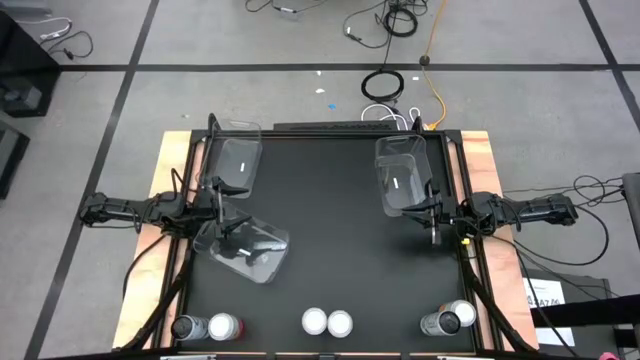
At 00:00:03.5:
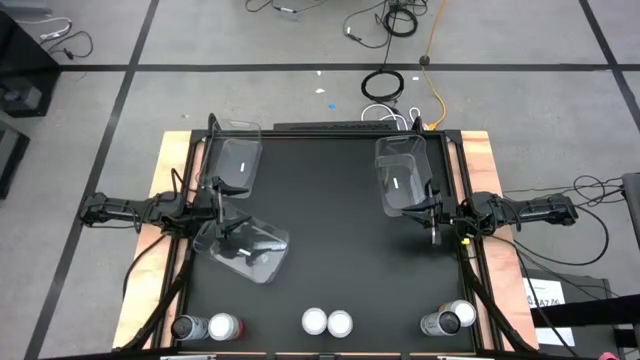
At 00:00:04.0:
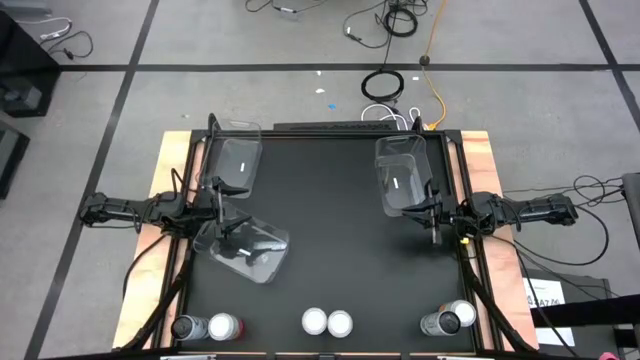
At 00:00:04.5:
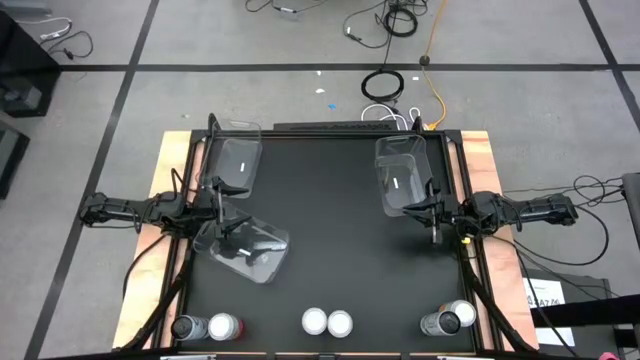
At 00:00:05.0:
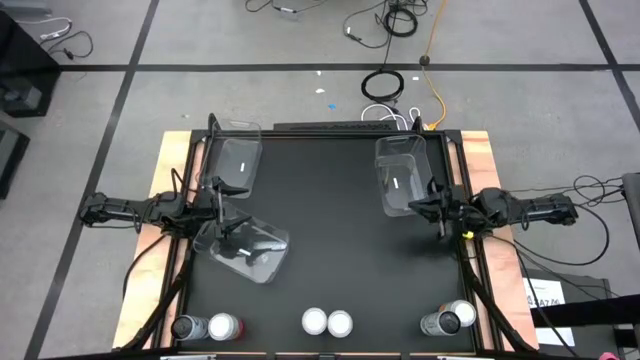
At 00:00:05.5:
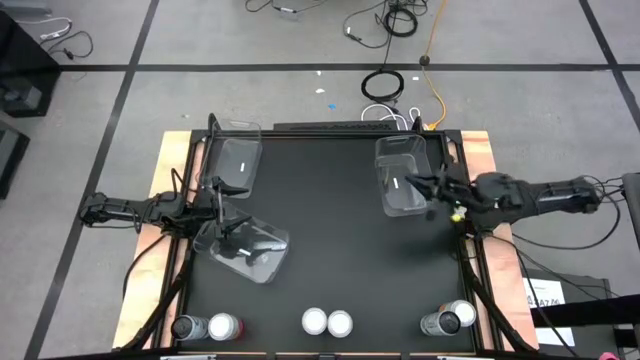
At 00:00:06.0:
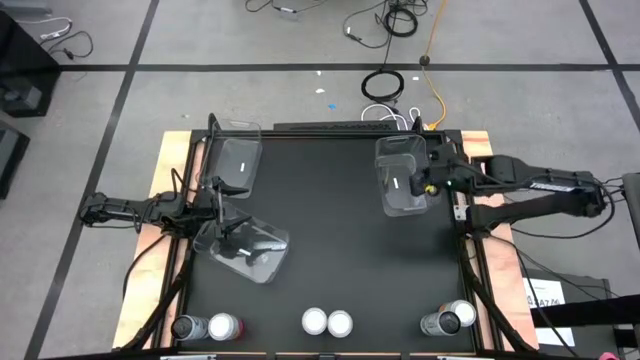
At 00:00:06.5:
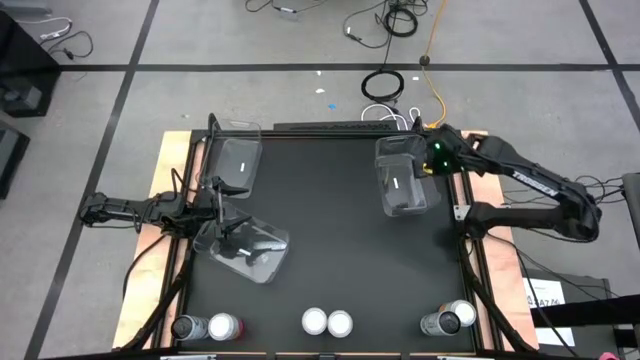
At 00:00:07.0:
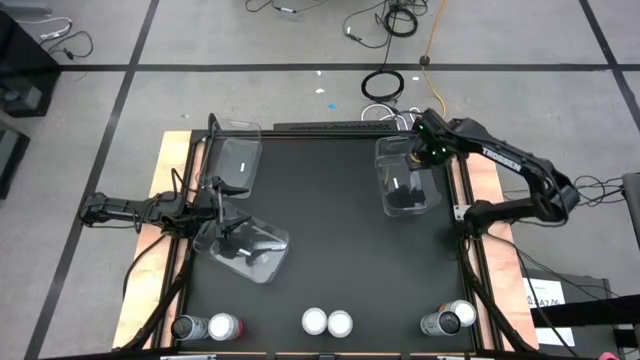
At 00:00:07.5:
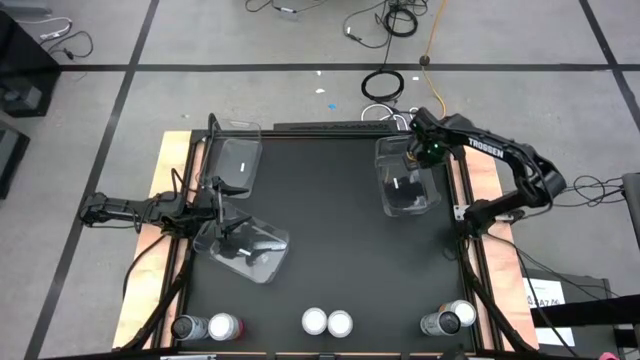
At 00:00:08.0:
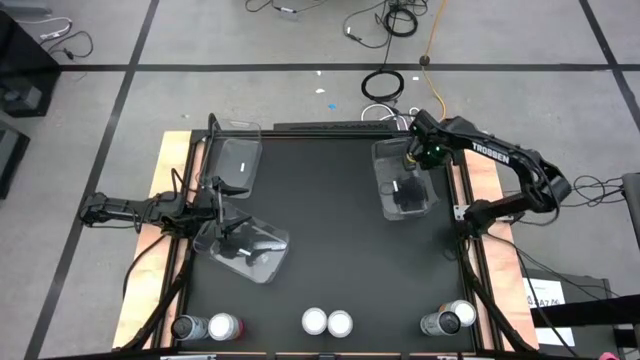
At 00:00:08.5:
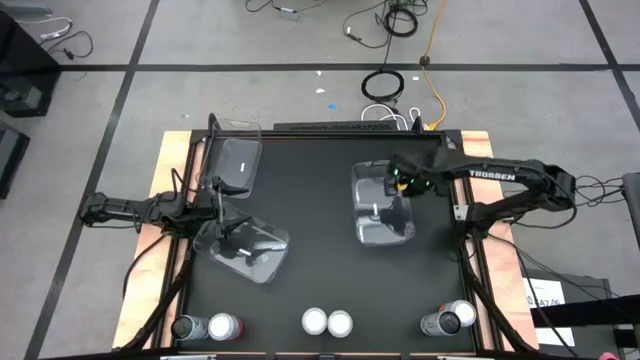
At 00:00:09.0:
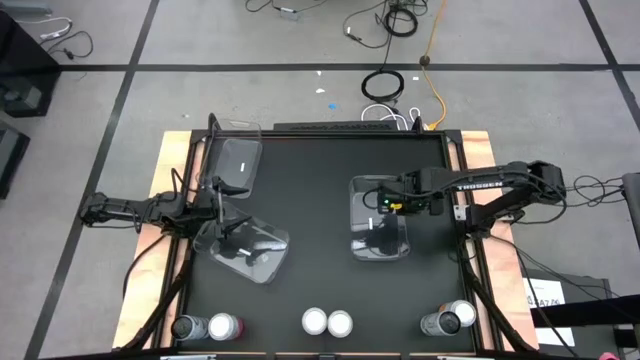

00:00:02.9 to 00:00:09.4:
Task: Sort soda cans
Move the top right transparent bin to the middle right of the table

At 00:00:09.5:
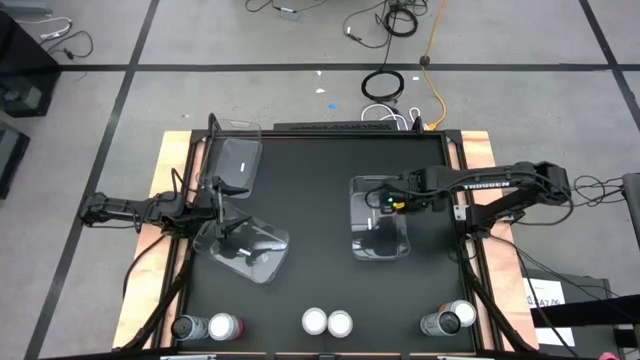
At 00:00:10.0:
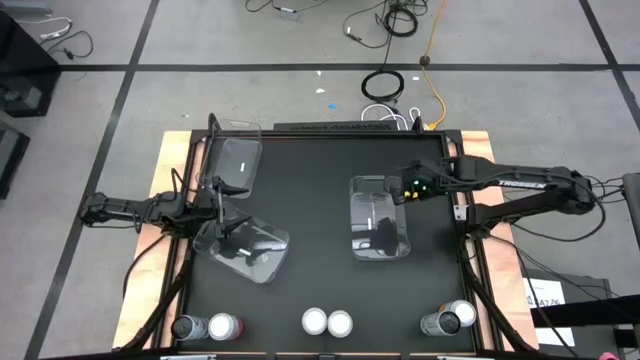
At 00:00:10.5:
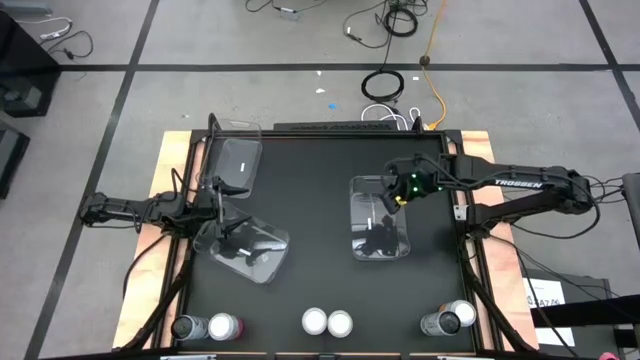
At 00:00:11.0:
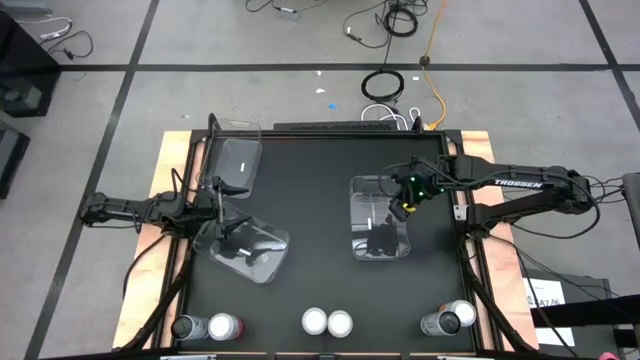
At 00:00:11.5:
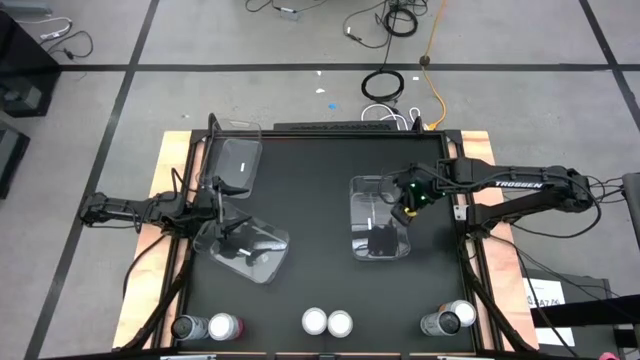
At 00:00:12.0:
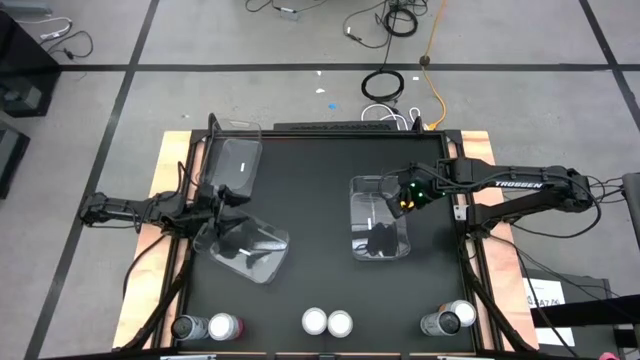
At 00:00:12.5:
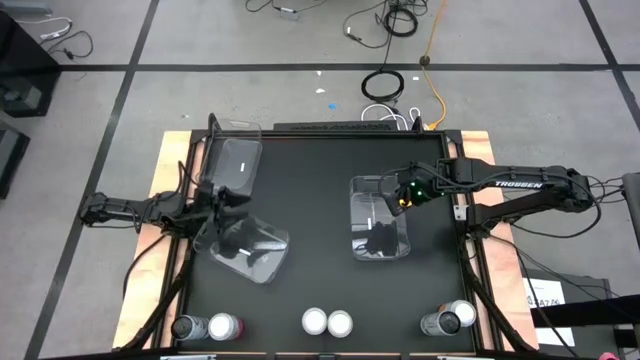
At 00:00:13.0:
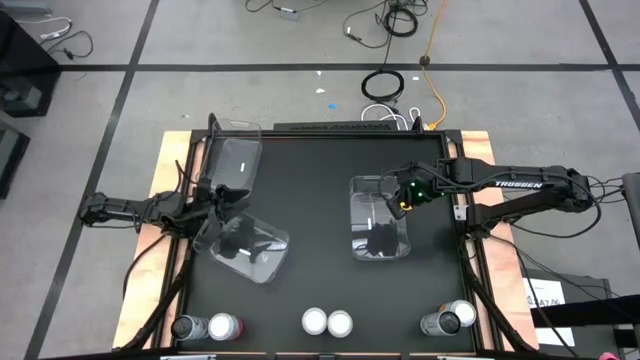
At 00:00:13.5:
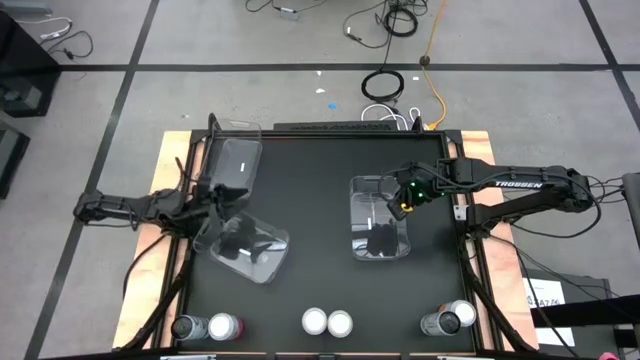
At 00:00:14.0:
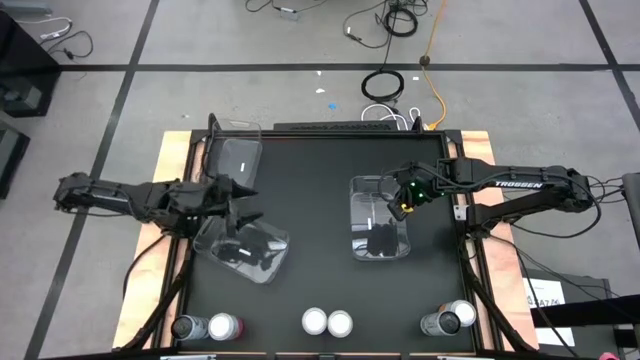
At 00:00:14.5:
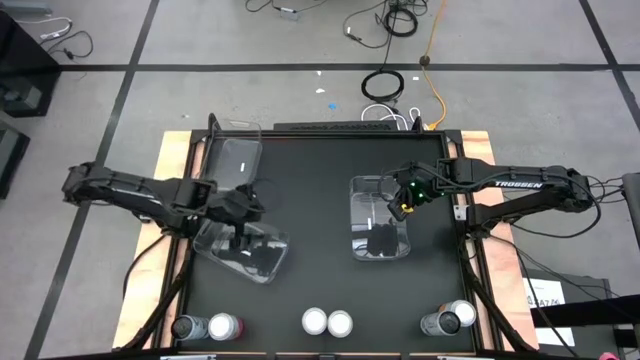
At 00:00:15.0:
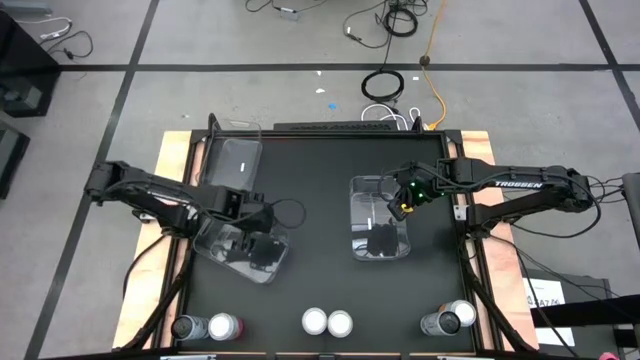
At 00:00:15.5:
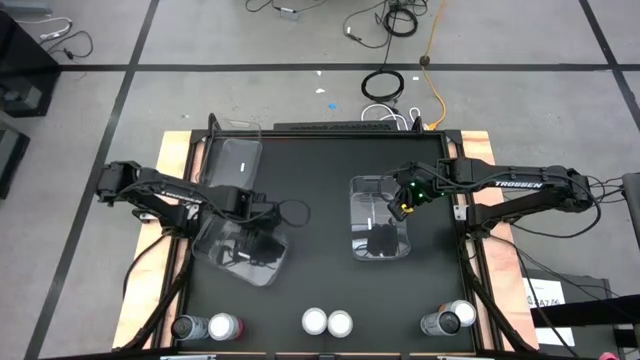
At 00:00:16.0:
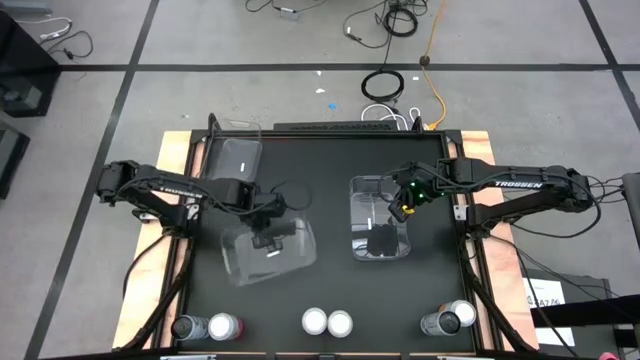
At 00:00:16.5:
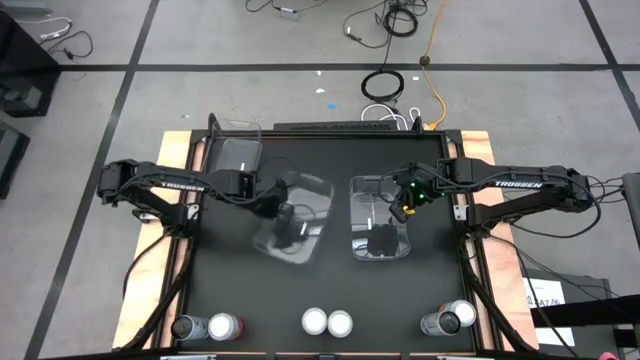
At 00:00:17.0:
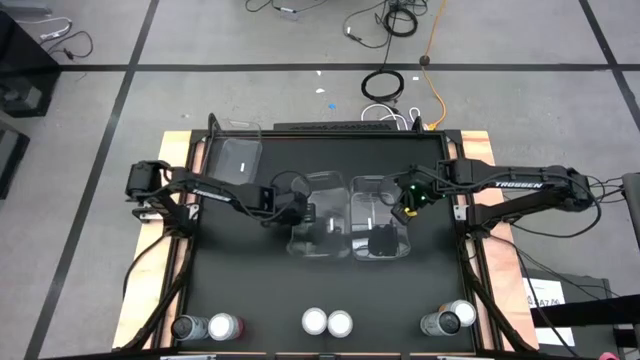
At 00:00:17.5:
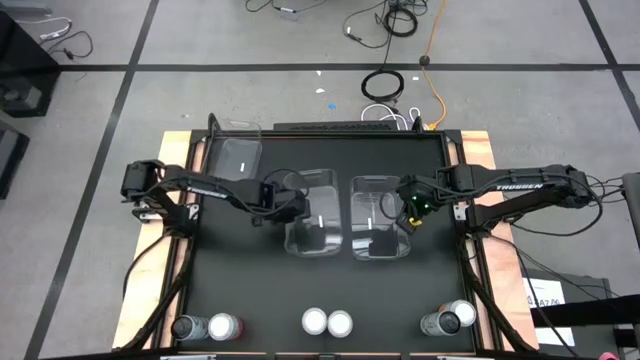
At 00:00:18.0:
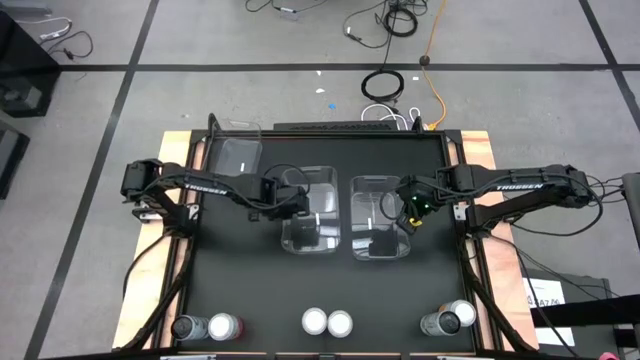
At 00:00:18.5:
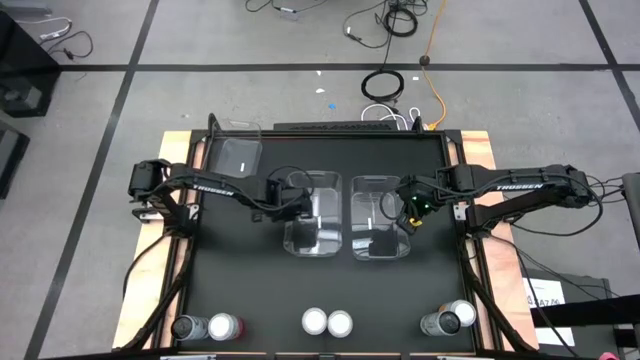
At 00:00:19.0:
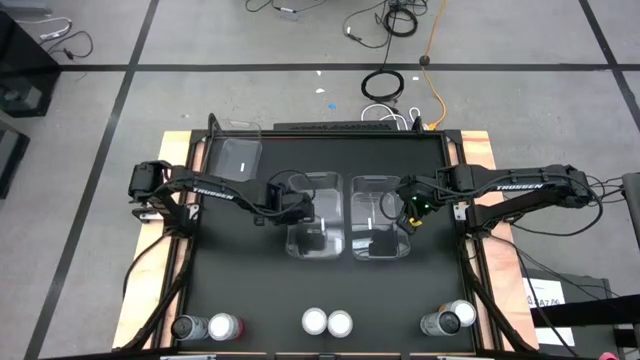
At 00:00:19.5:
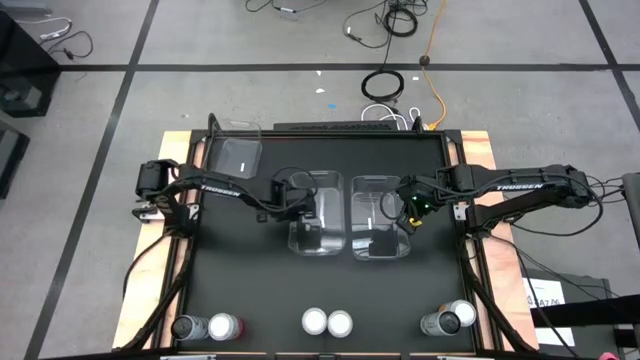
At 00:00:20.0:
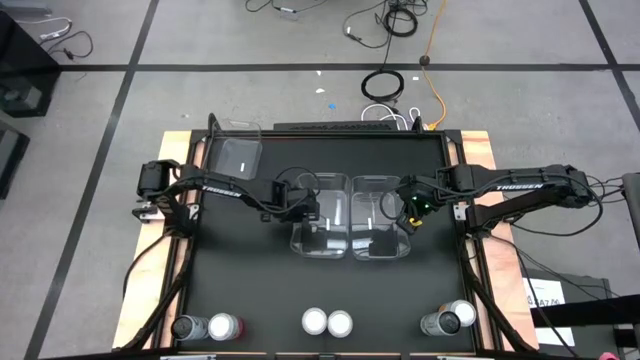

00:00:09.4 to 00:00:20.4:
Move the middle left transparent bin to the center of the table

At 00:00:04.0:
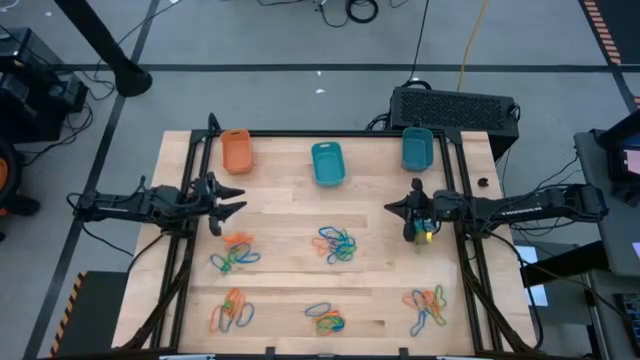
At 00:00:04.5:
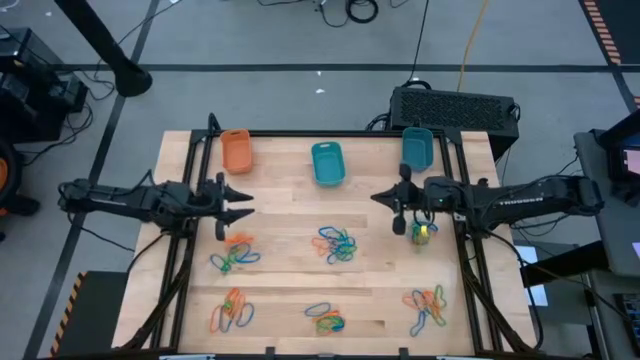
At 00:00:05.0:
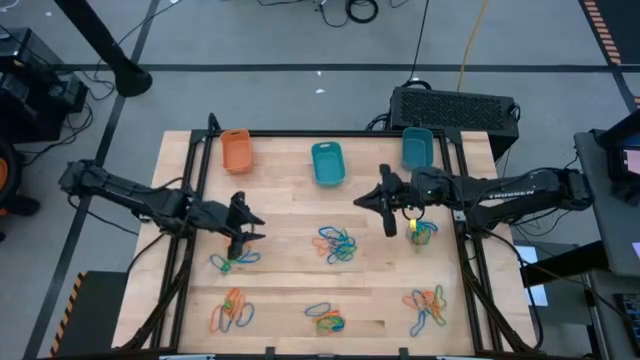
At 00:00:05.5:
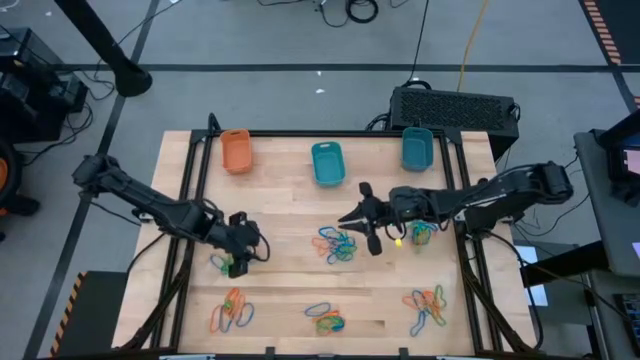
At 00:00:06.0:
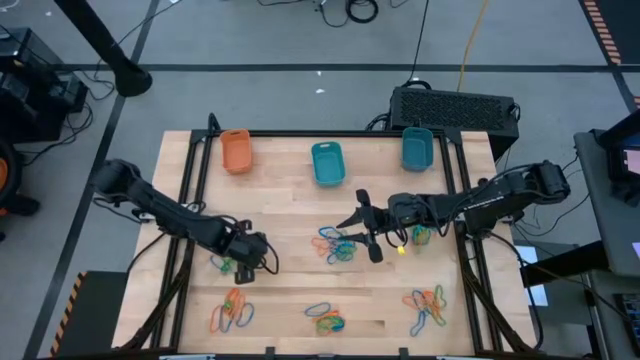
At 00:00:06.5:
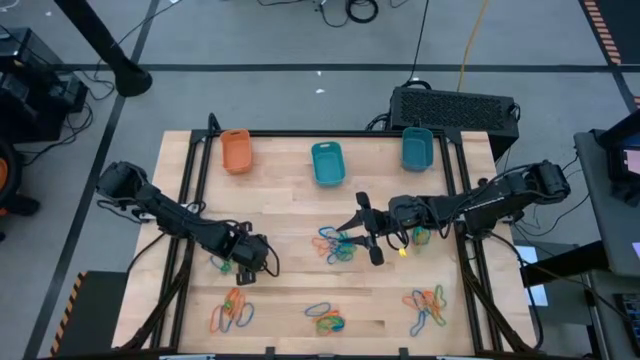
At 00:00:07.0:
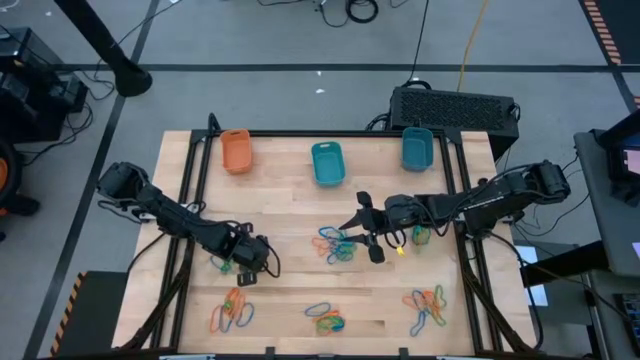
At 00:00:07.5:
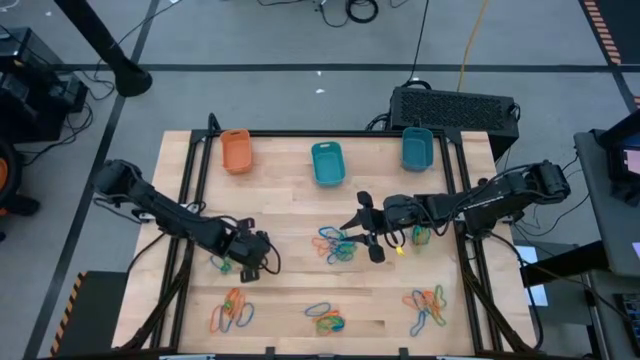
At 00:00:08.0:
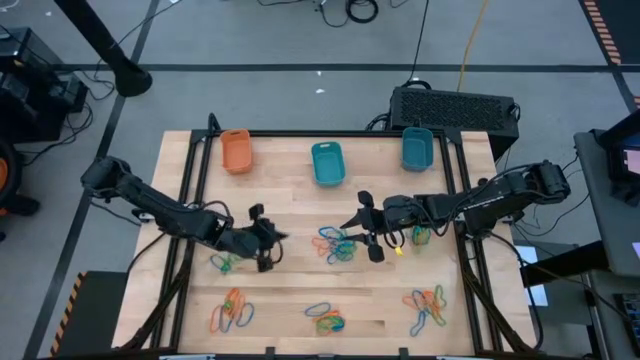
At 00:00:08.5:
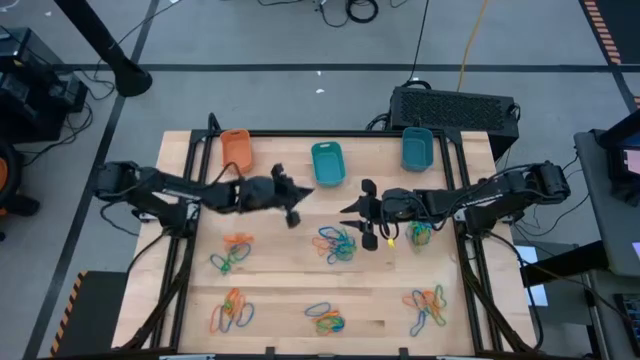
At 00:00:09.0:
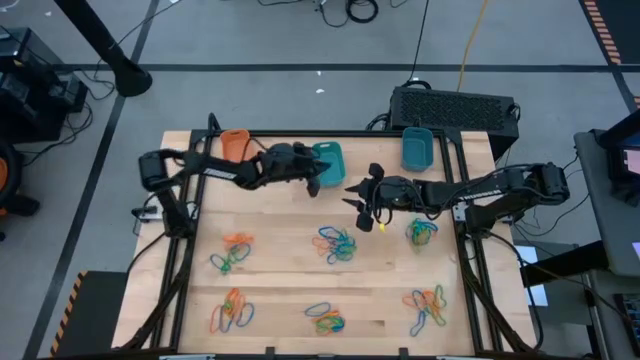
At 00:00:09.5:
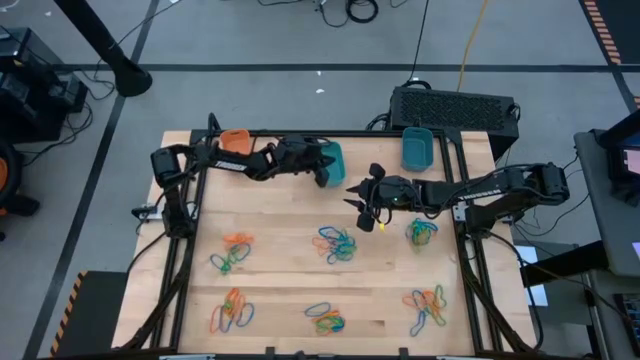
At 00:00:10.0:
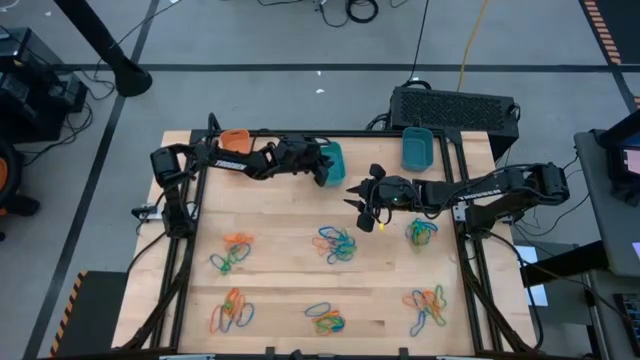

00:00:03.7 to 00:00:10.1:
Task: Sort rubber bands into baskets
Put the blue rubber band into the light blue bin
